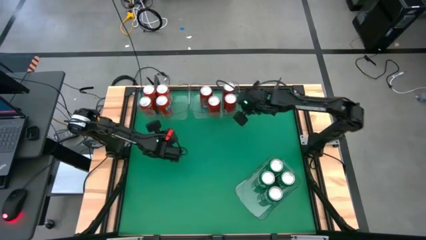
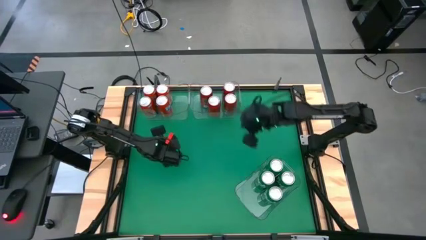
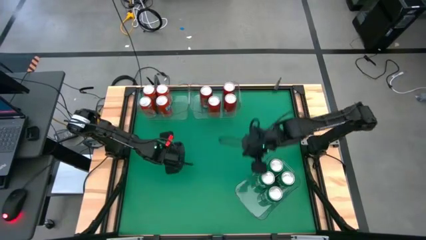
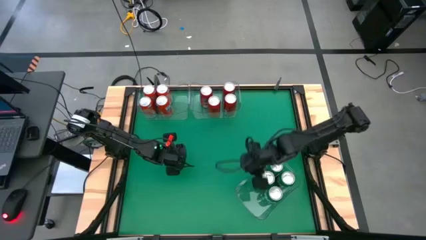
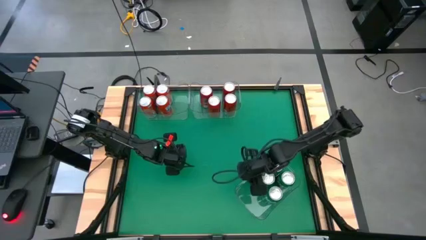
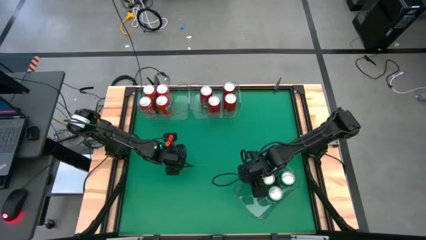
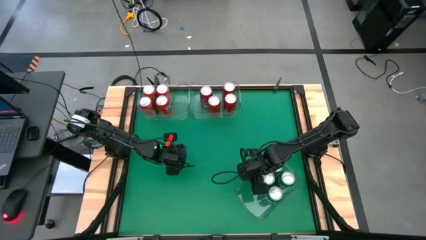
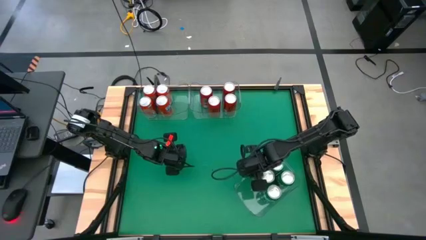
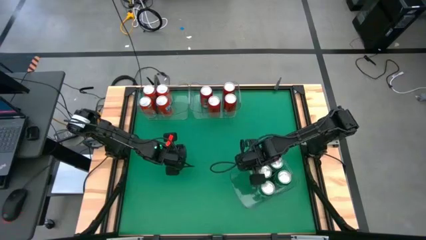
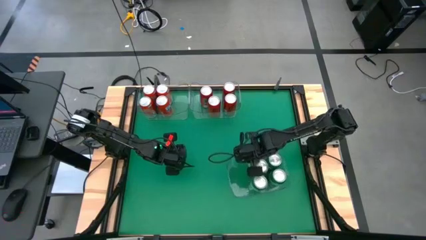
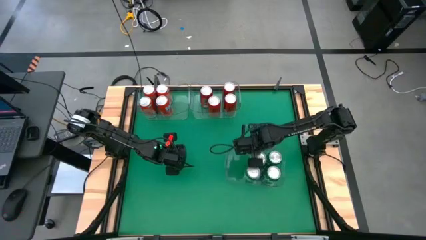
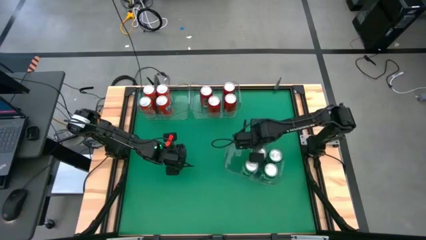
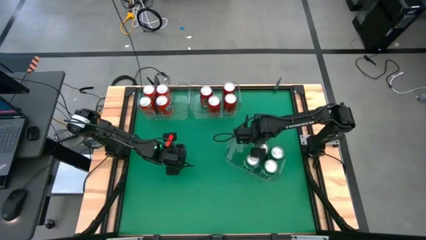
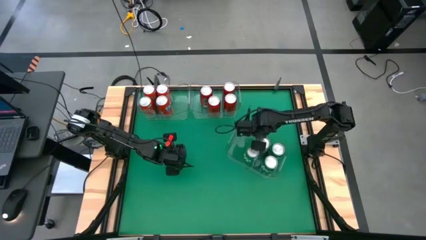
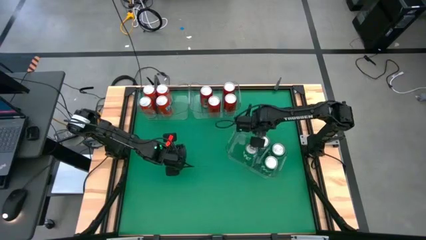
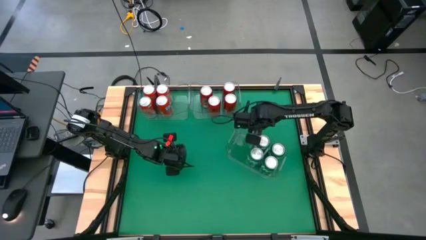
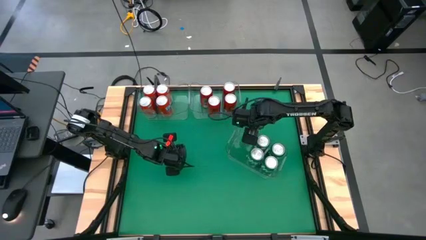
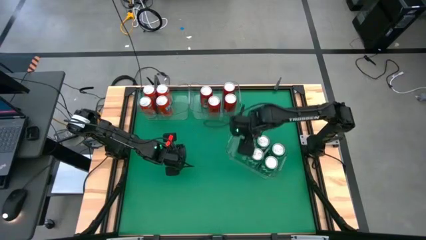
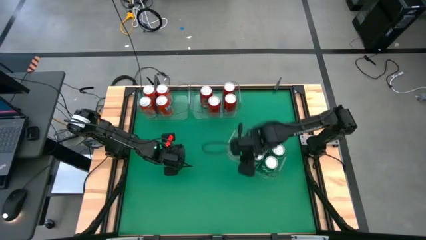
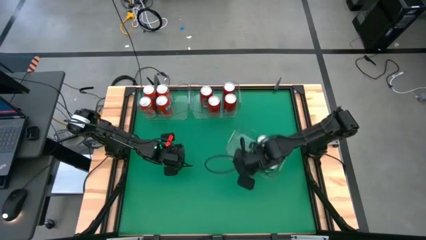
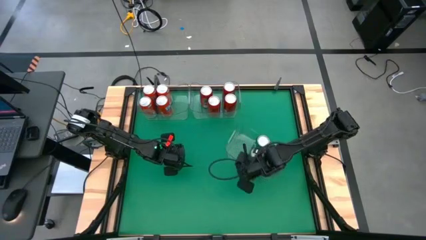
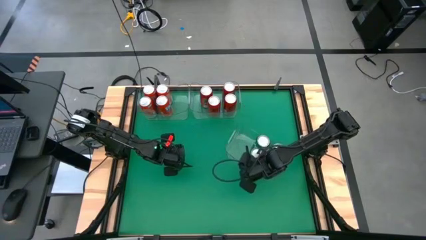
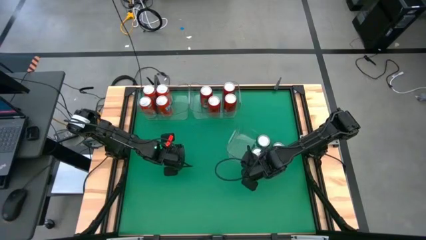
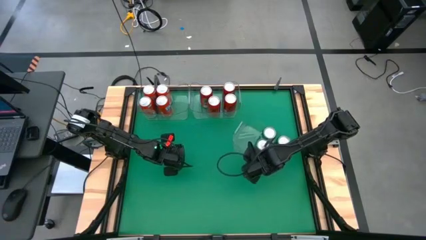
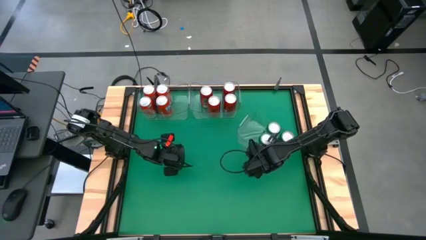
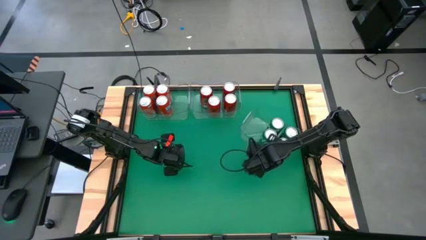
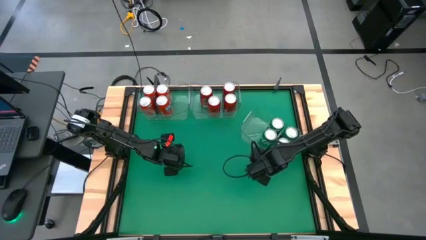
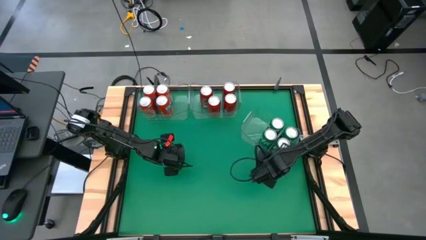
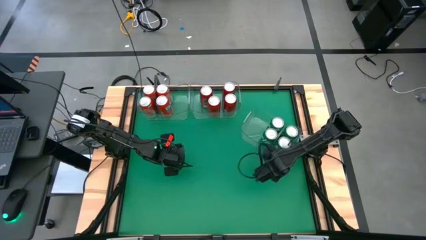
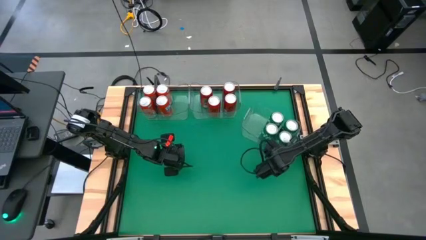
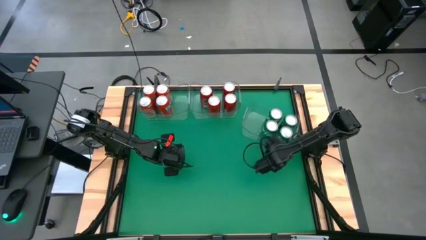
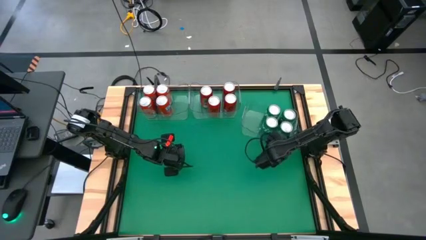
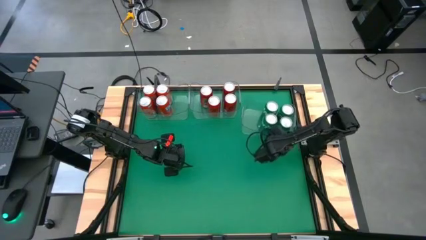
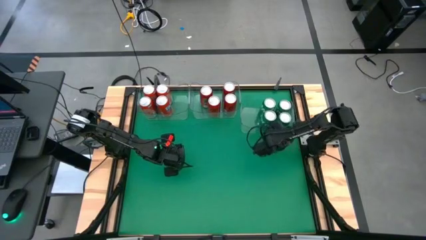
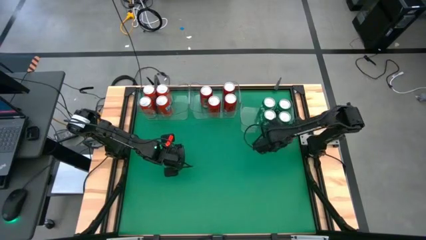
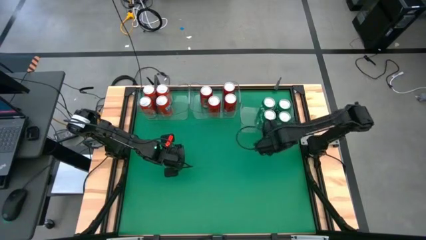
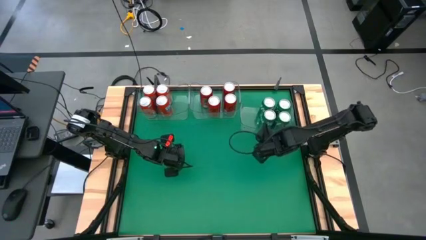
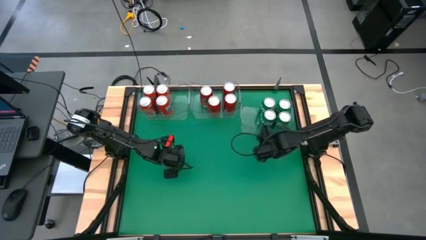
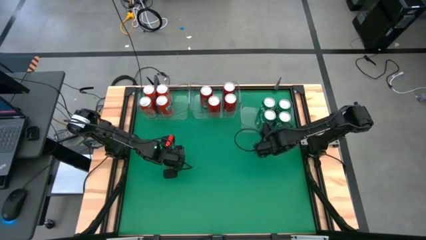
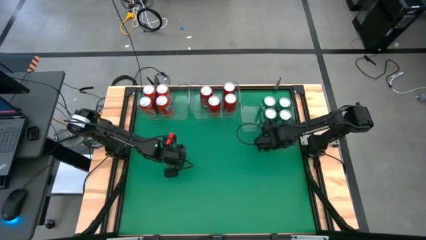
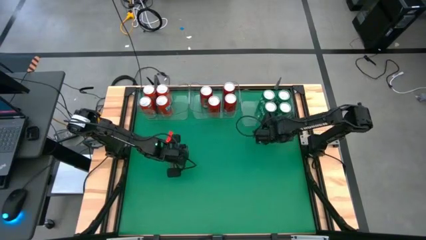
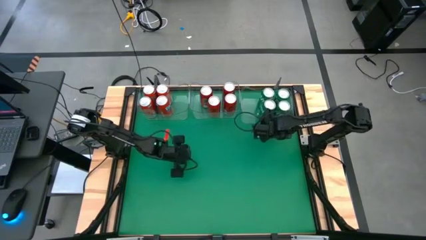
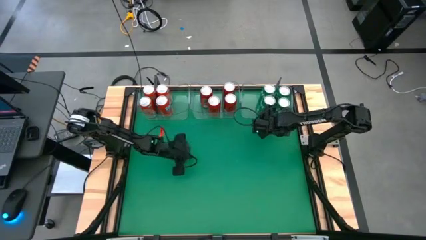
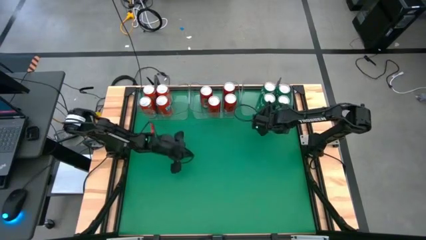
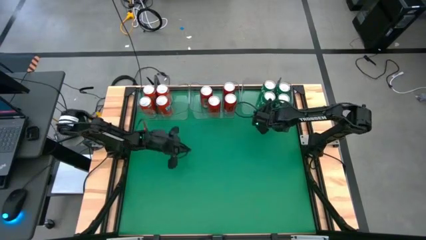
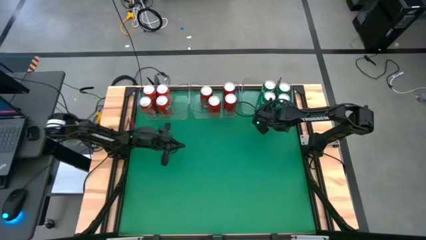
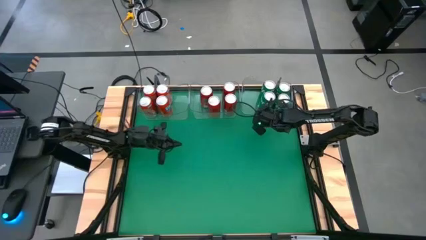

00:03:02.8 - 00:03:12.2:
Task: Sort soda cans
Move the bottom transparent bin to the top right of the table

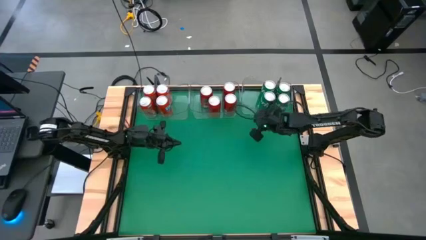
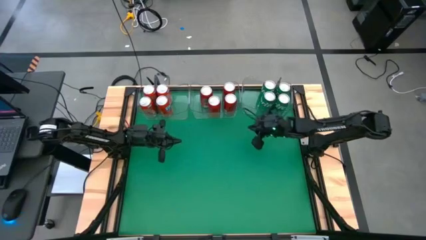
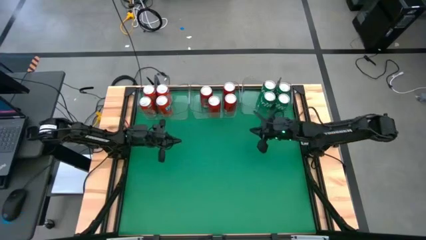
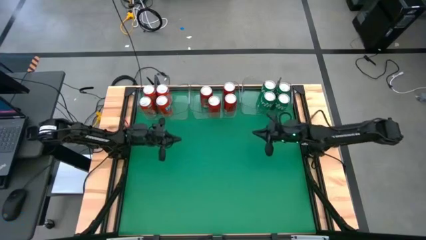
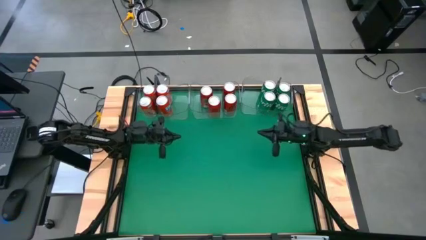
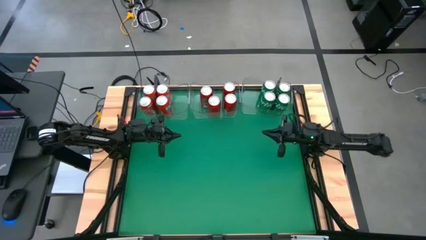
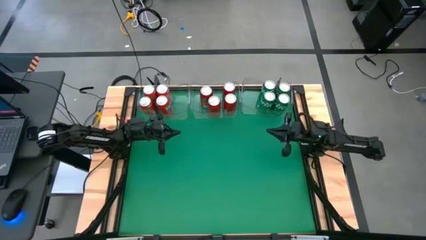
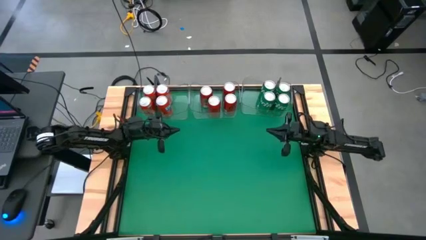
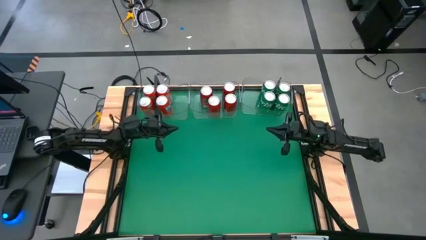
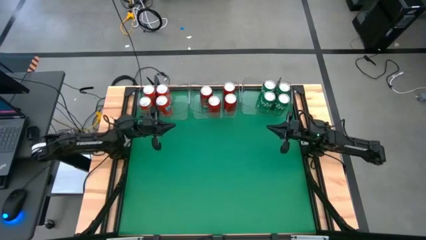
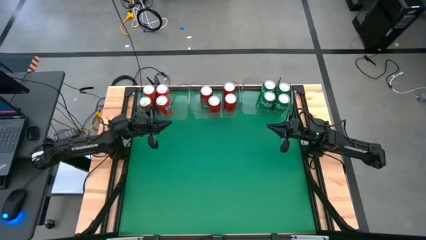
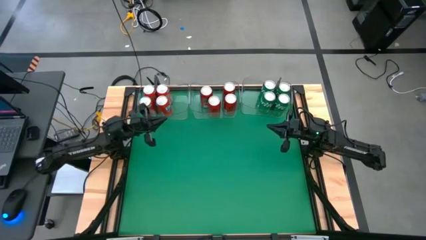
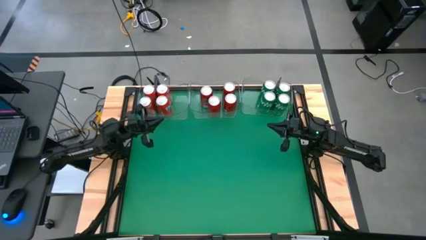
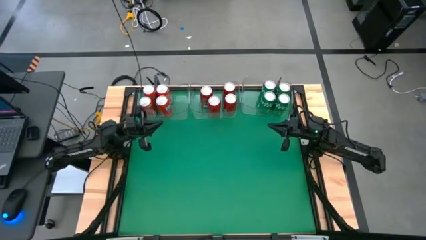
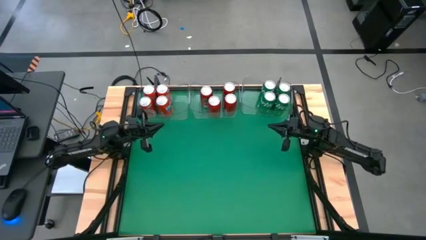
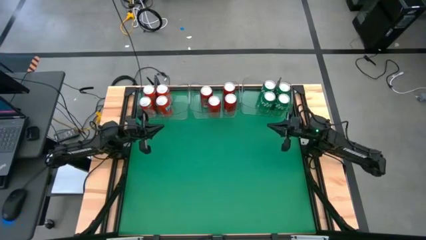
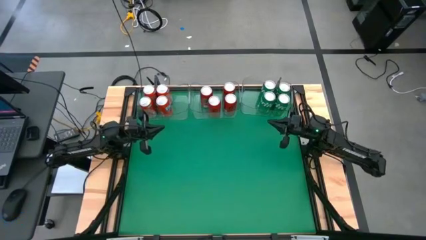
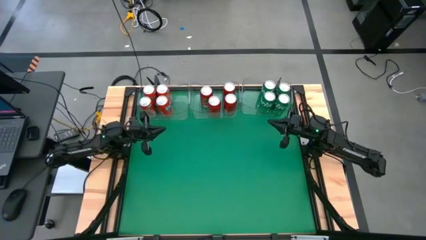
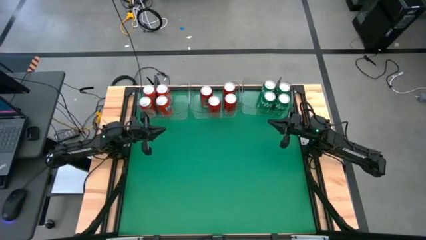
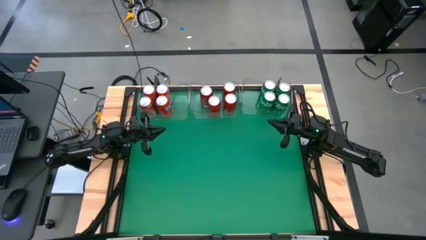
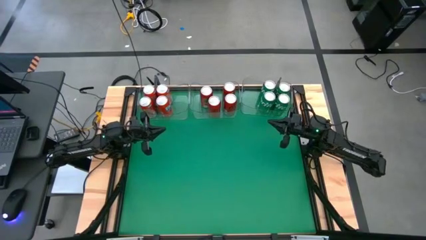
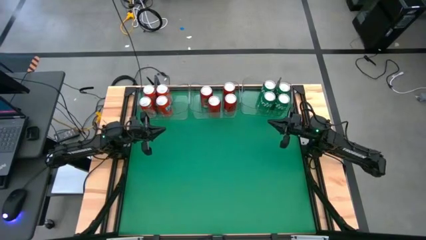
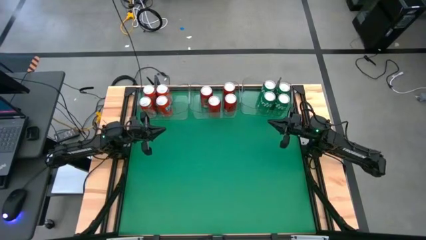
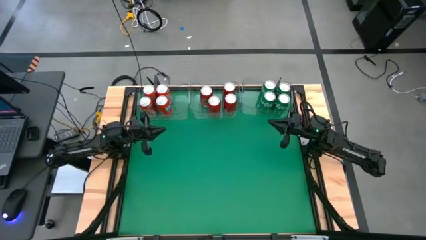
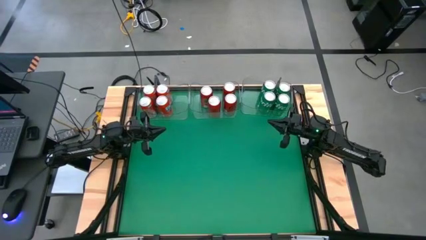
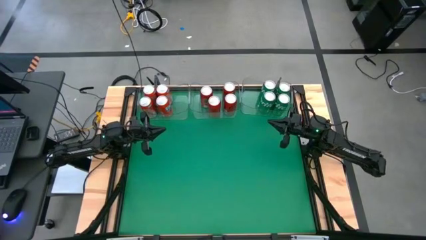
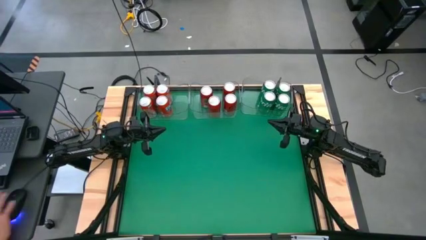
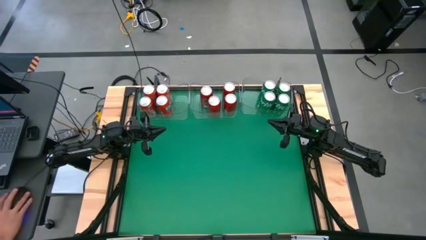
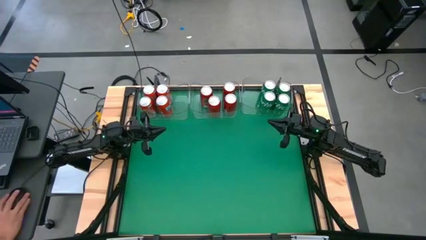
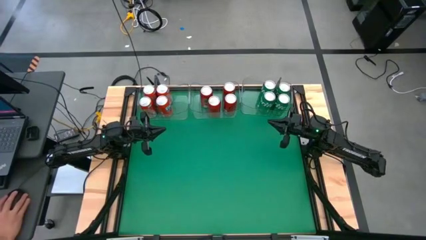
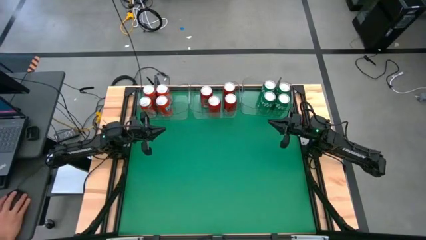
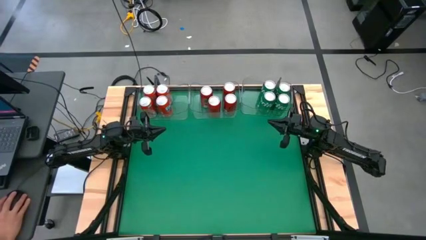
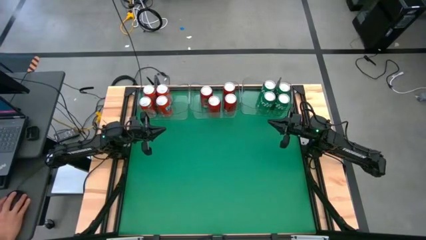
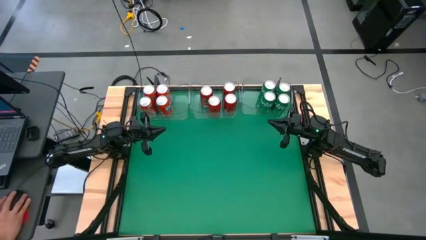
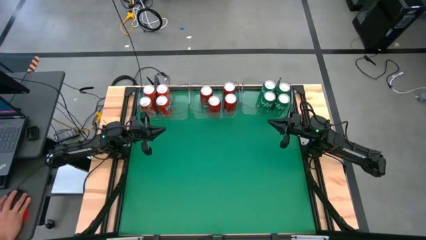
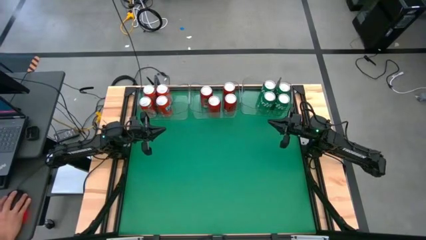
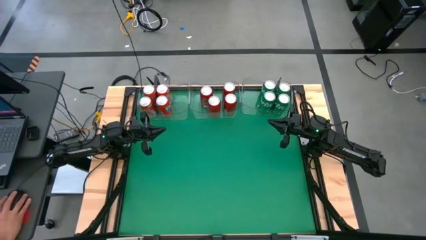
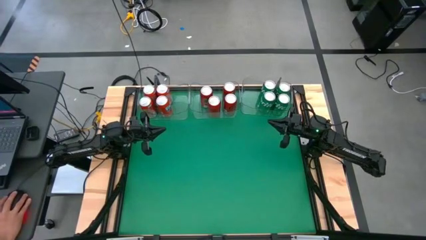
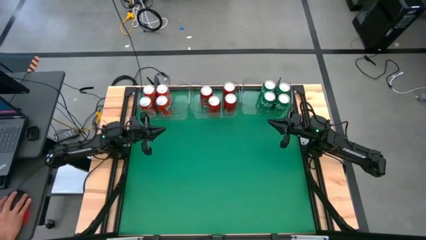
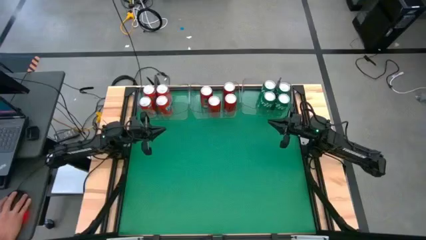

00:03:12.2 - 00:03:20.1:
Return to Home Position
